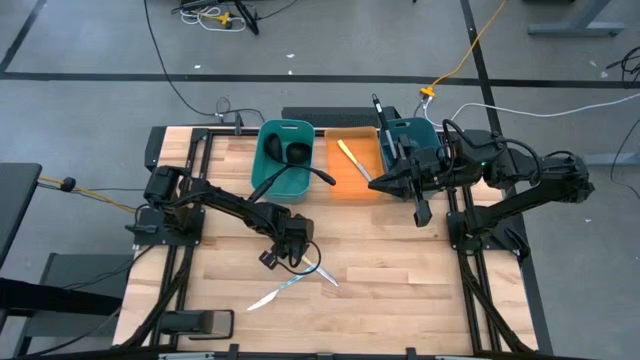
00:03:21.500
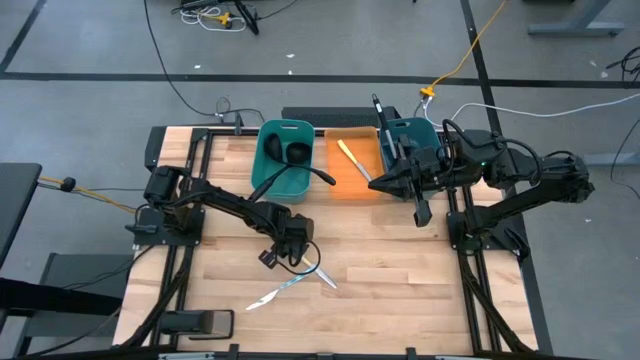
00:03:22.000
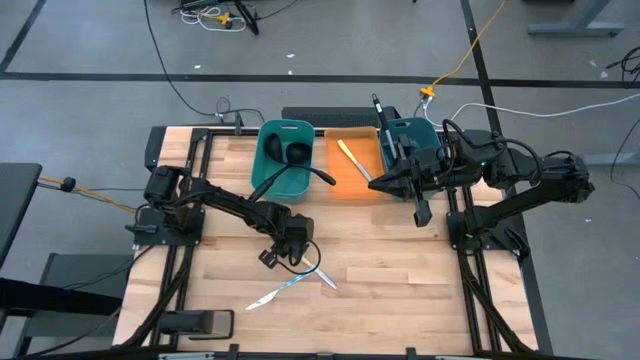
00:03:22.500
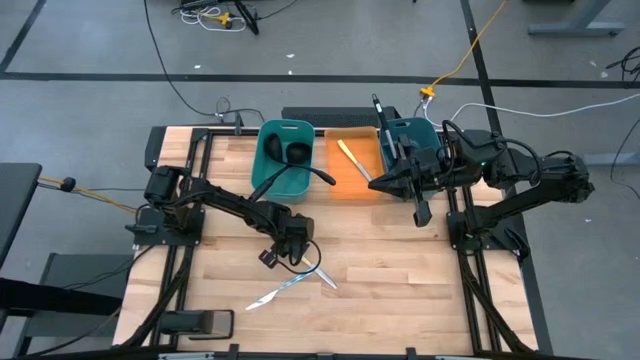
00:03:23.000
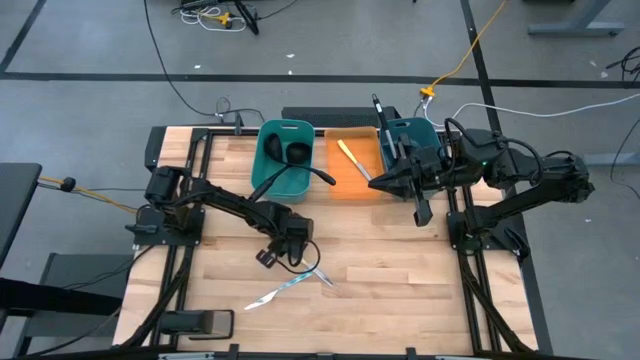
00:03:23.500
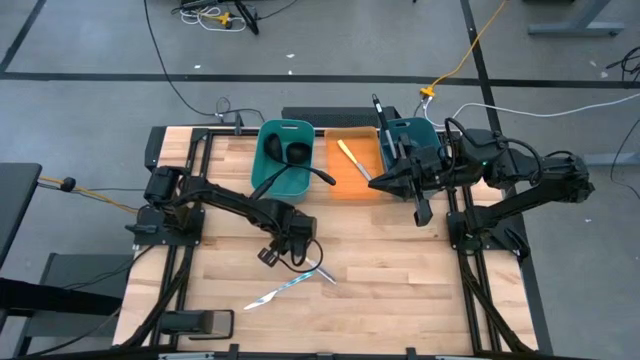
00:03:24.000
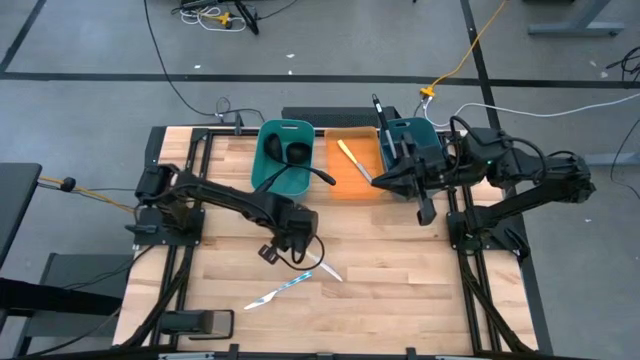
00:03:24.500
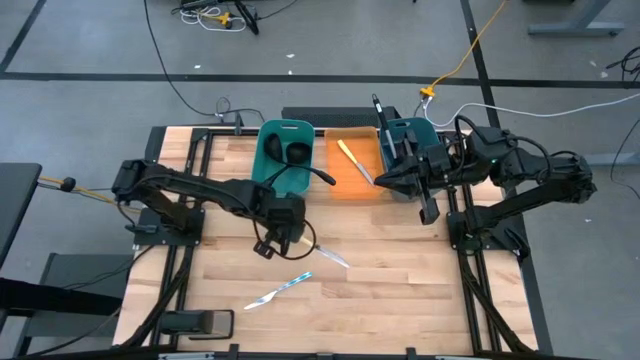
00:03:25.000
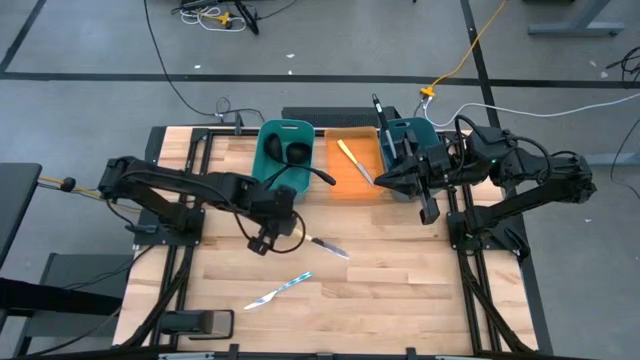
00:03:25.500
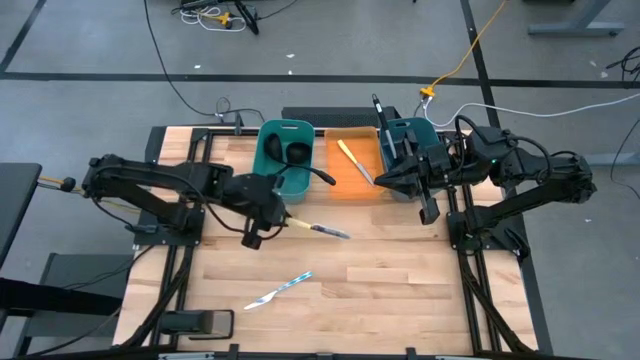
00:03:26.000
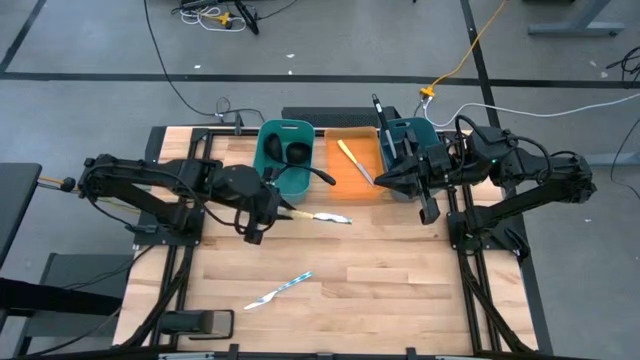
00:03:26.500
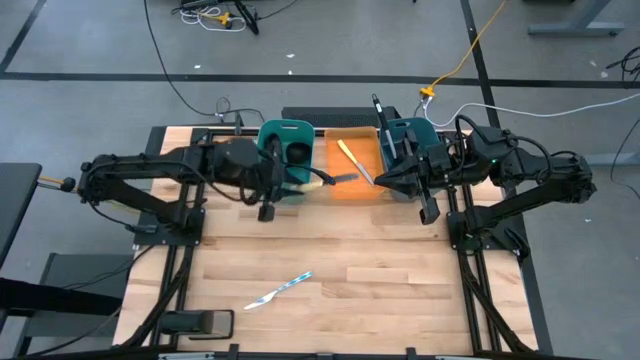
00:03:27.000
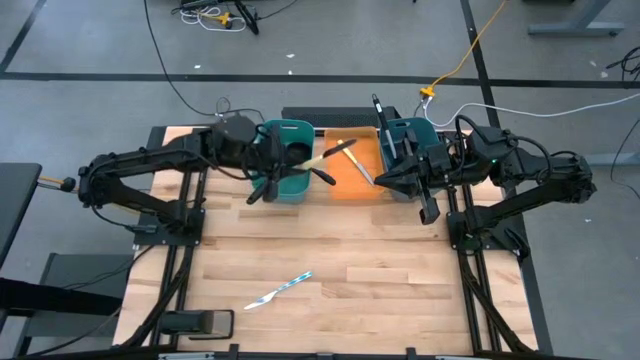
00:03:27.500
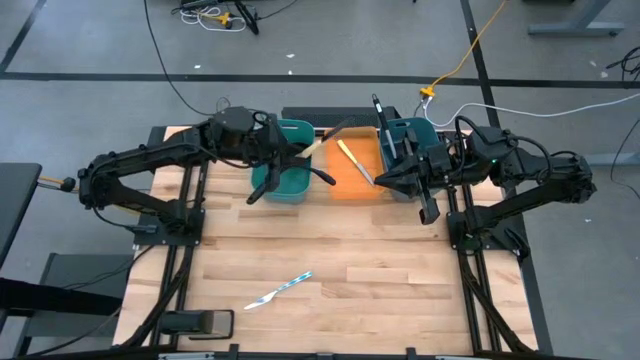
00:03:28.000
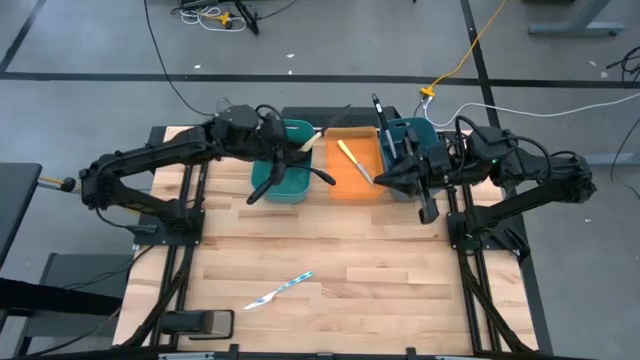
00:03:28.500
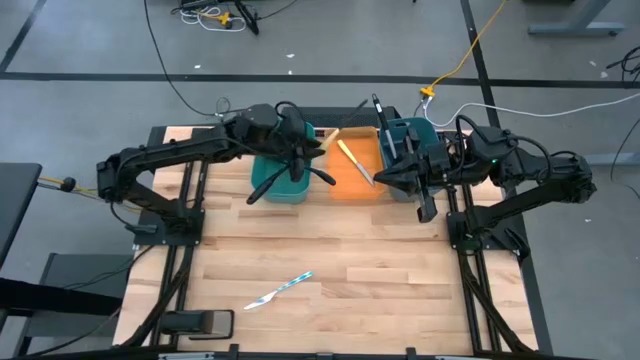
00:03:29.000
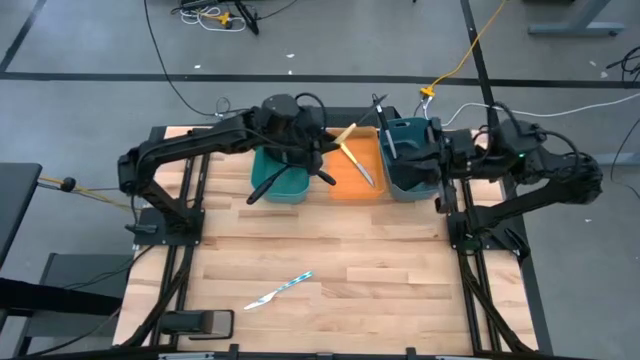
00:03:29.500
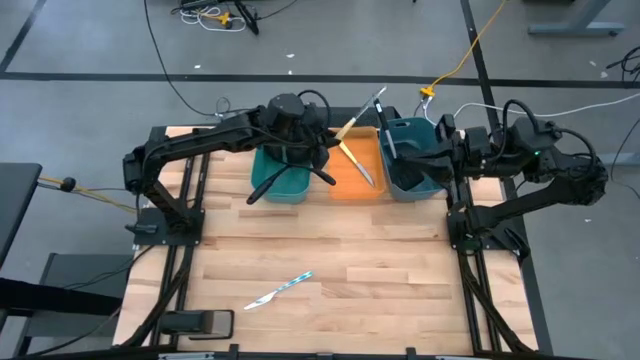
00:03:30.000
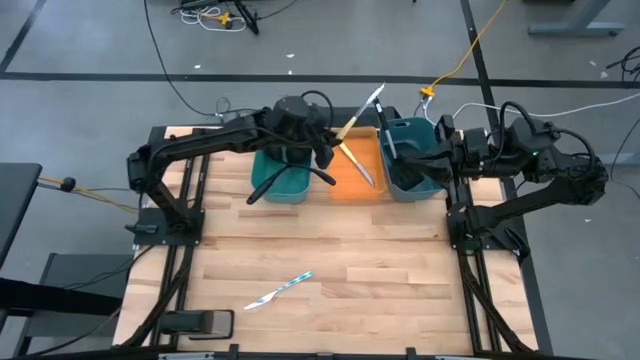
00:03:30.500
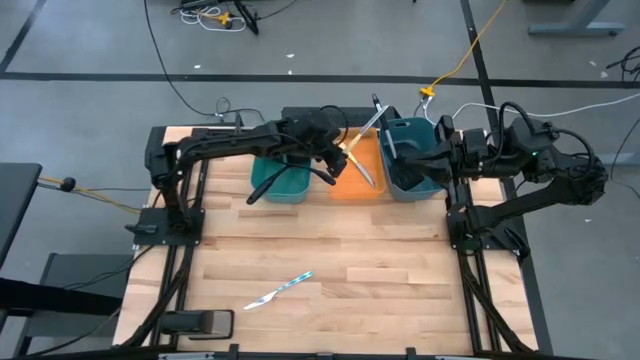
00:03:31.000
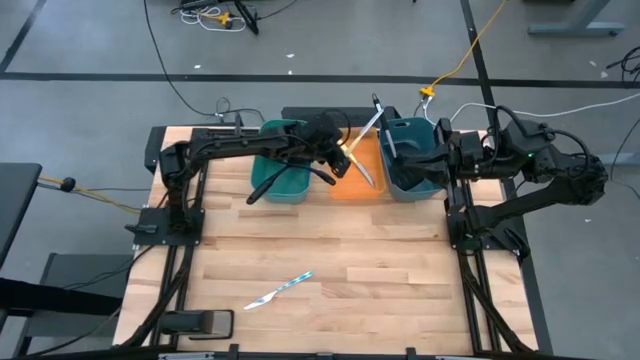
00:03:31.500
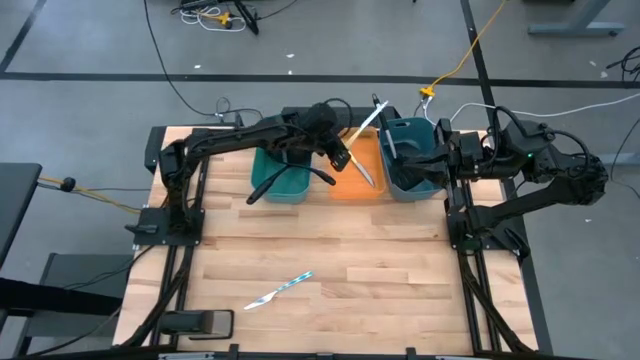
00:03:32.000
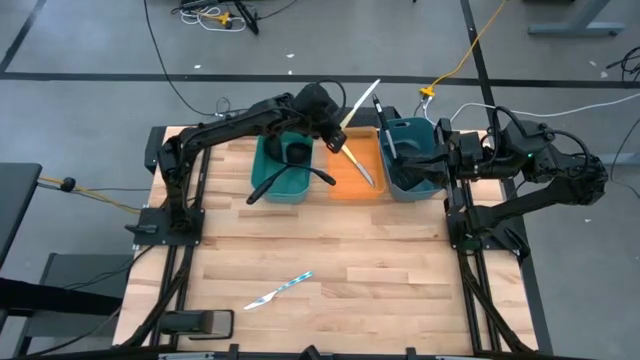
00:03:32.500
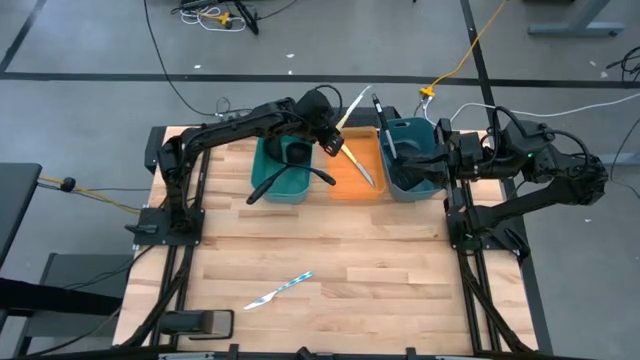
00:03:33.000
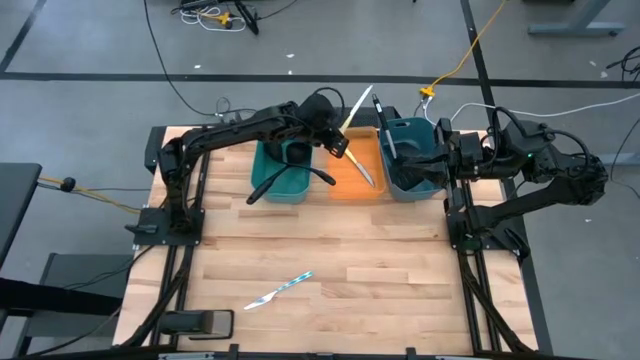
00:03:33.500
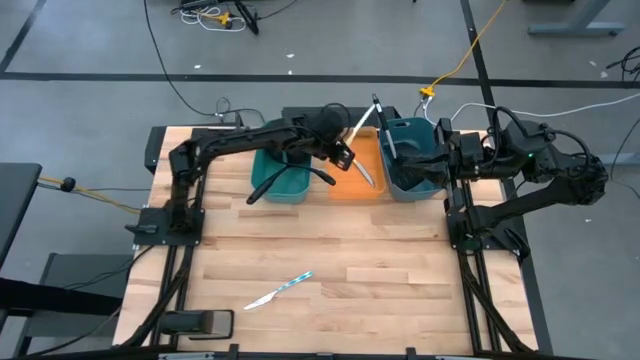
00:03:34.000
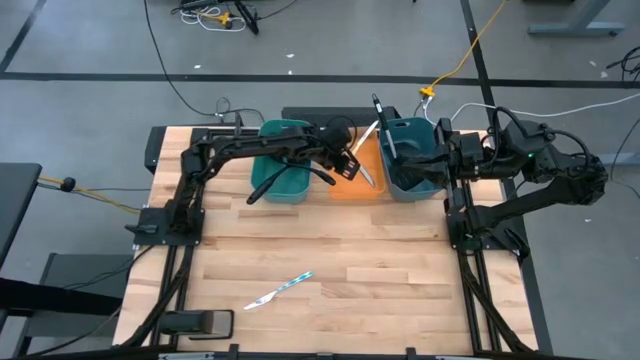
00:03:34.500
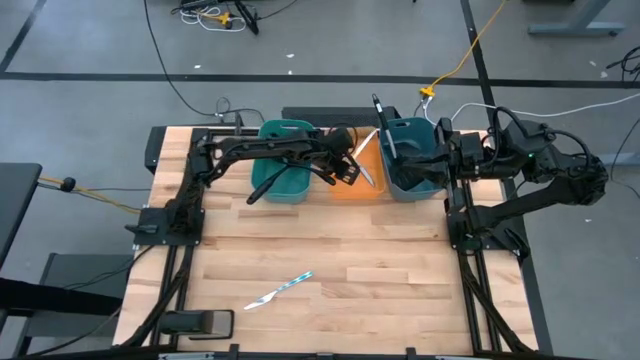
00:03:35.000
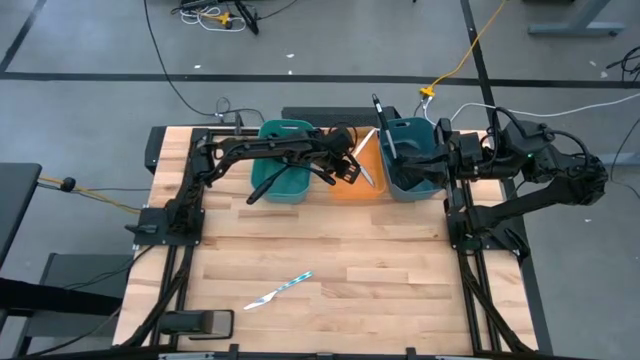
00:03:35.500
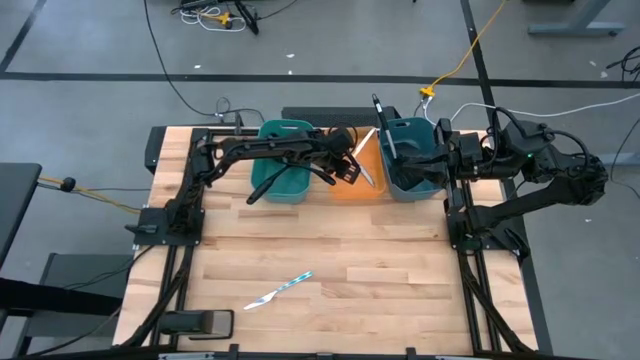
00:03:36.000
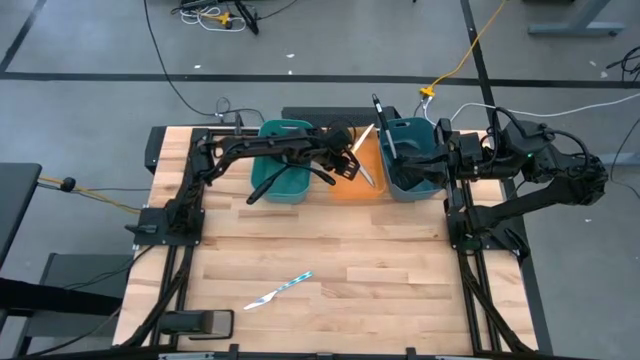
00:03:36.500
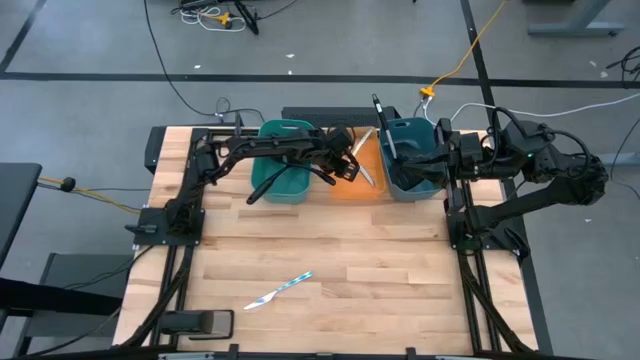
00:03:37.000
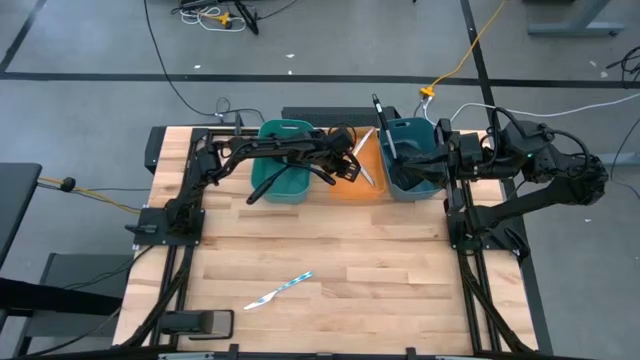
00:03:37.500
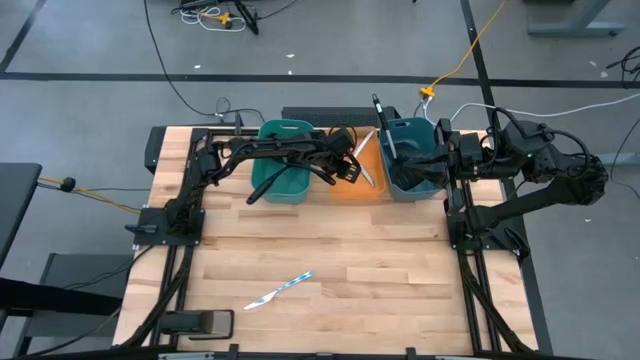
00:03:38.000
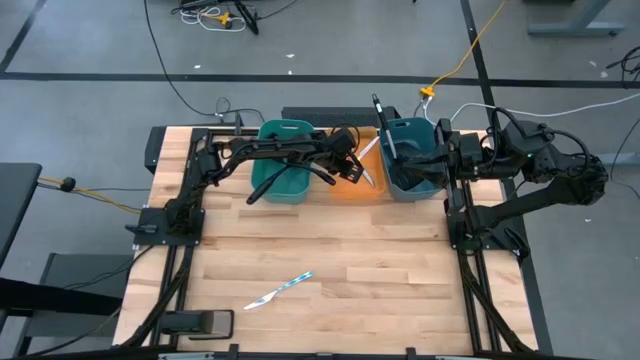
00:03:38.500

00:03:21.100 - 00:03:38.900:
Task: Pick & Place Kitchen Items
Put the yellow table knife into the orange bin
